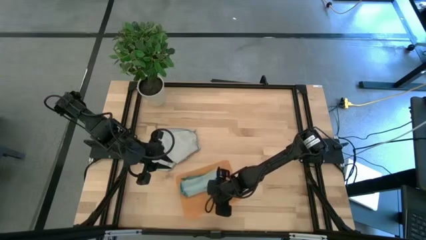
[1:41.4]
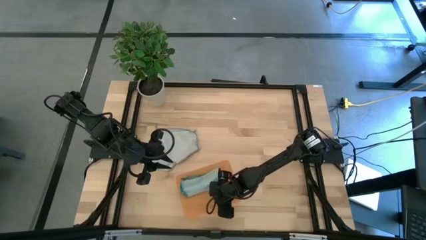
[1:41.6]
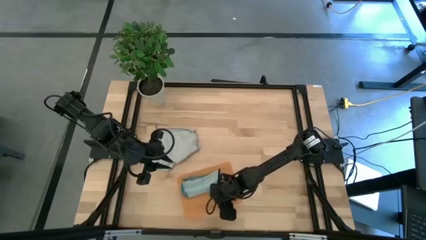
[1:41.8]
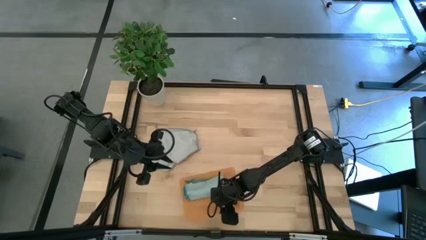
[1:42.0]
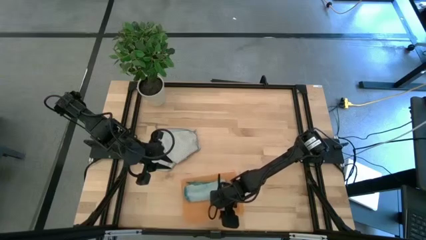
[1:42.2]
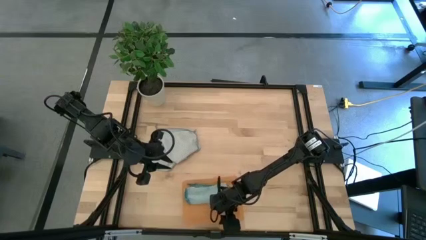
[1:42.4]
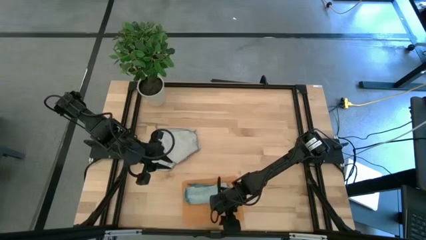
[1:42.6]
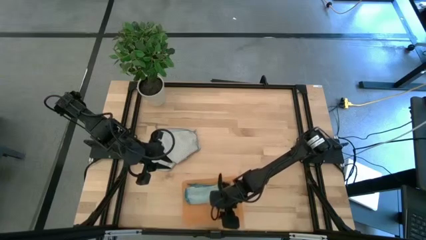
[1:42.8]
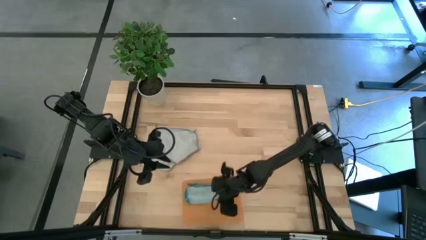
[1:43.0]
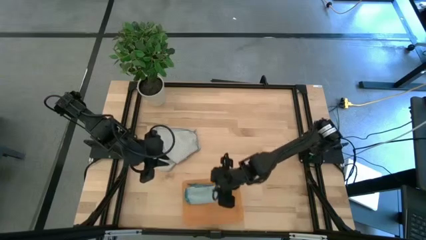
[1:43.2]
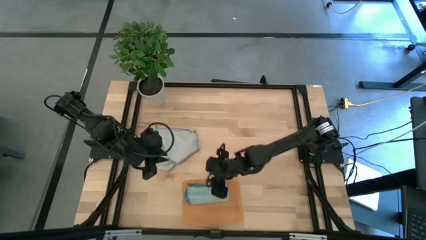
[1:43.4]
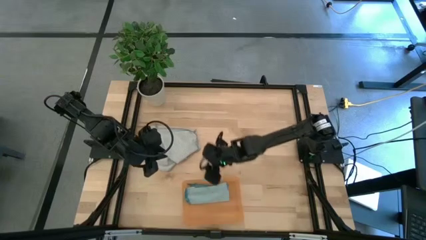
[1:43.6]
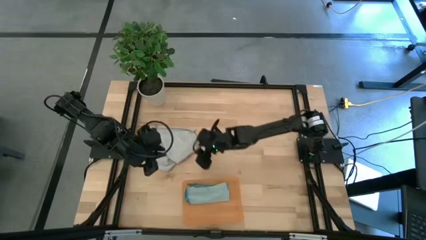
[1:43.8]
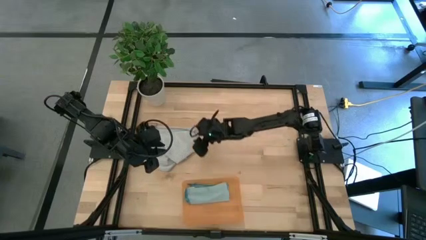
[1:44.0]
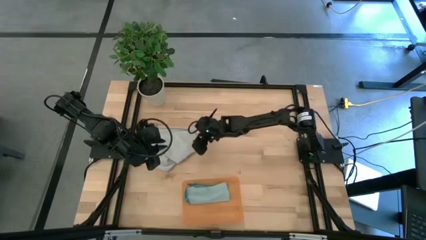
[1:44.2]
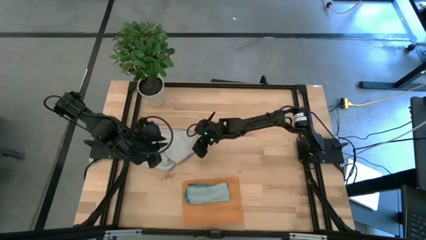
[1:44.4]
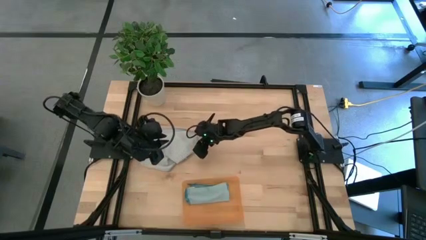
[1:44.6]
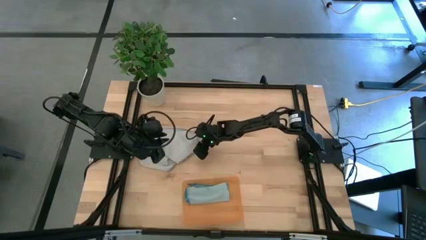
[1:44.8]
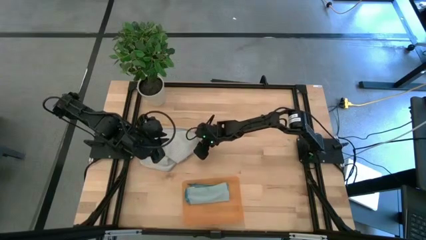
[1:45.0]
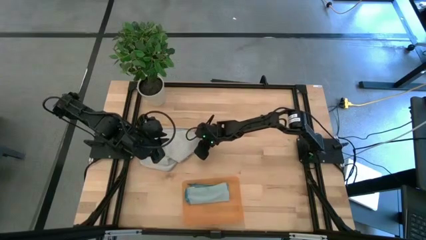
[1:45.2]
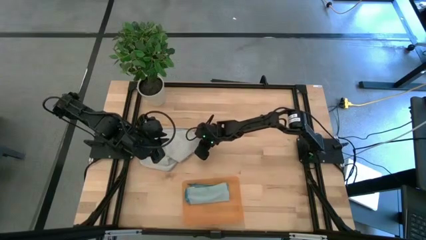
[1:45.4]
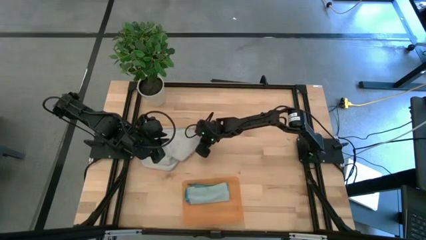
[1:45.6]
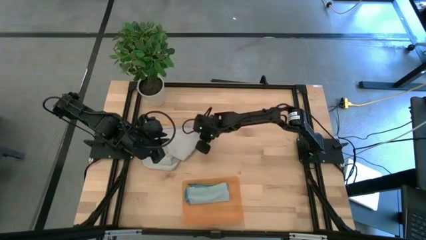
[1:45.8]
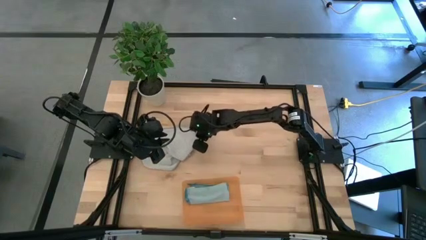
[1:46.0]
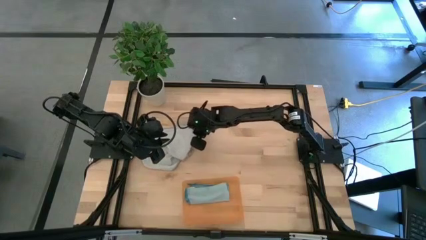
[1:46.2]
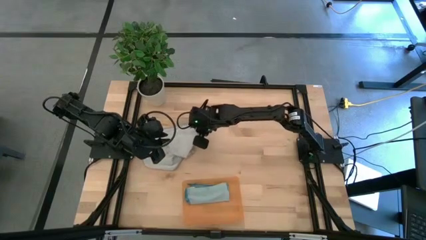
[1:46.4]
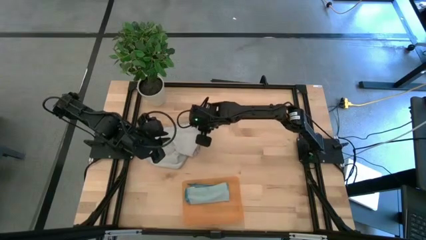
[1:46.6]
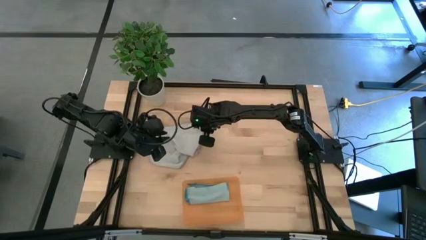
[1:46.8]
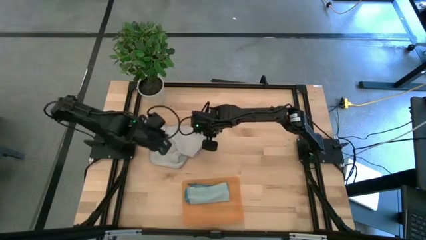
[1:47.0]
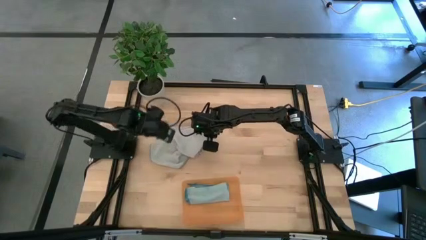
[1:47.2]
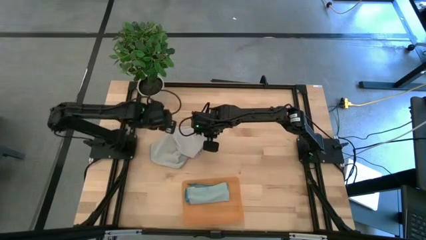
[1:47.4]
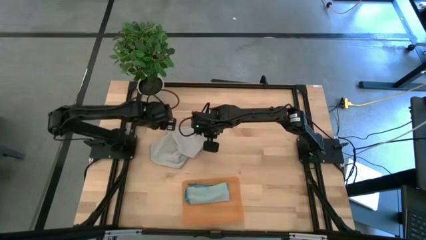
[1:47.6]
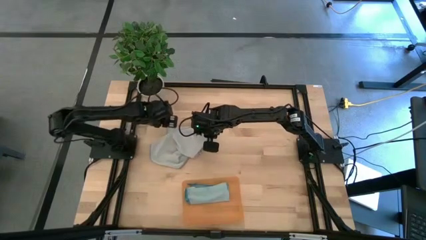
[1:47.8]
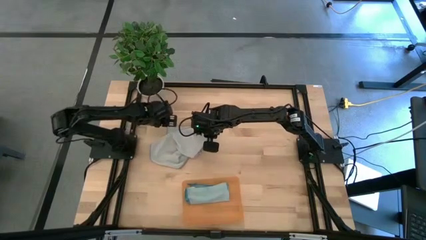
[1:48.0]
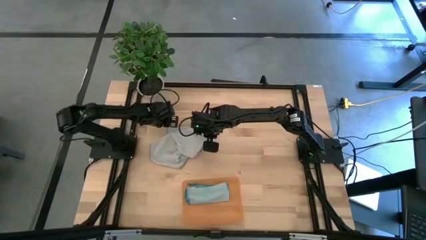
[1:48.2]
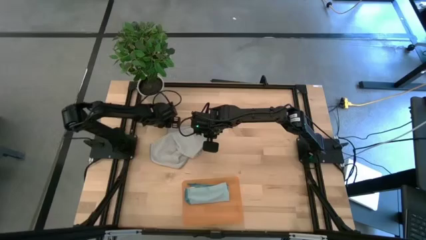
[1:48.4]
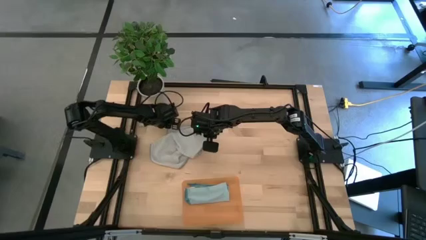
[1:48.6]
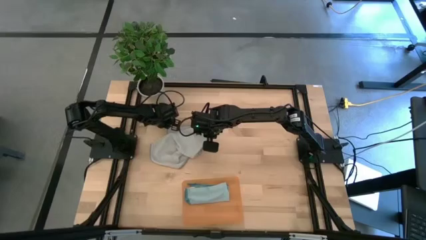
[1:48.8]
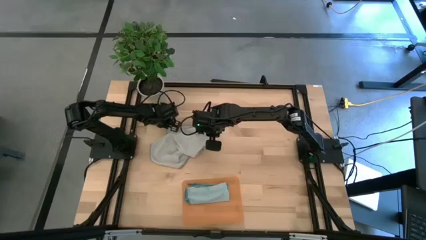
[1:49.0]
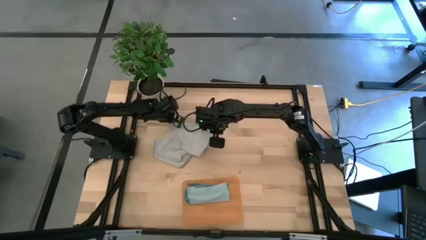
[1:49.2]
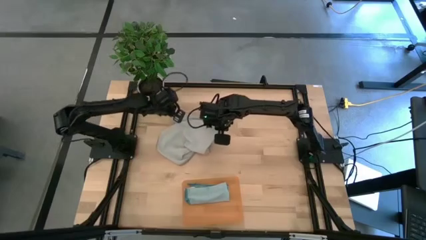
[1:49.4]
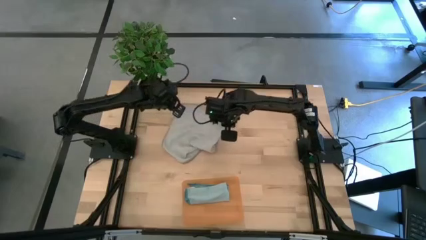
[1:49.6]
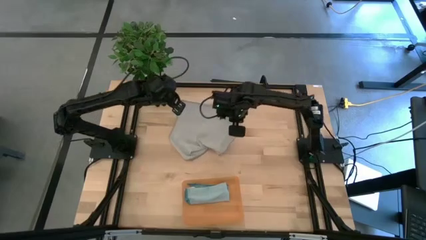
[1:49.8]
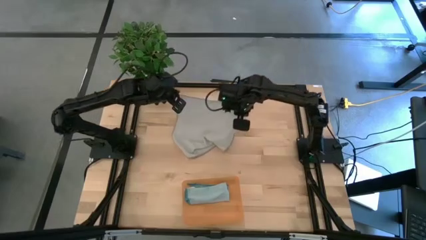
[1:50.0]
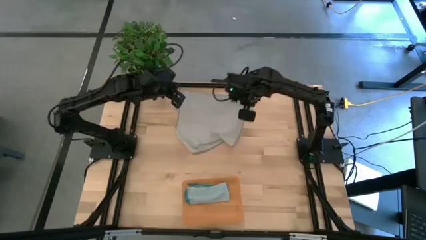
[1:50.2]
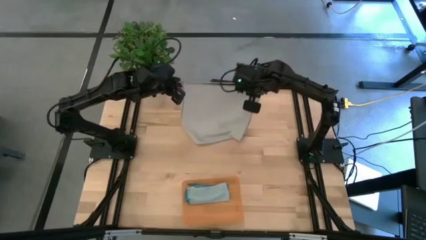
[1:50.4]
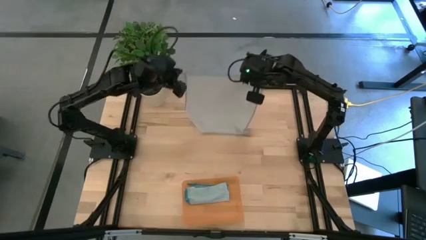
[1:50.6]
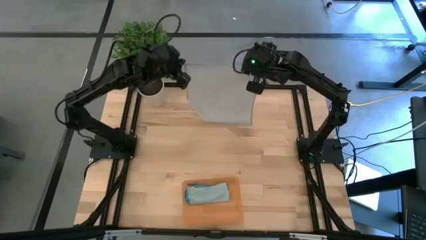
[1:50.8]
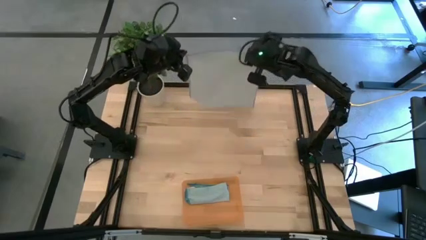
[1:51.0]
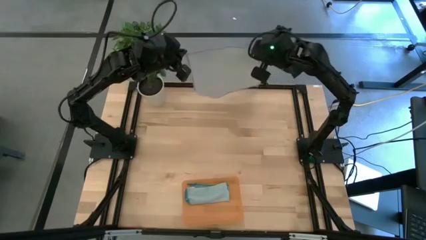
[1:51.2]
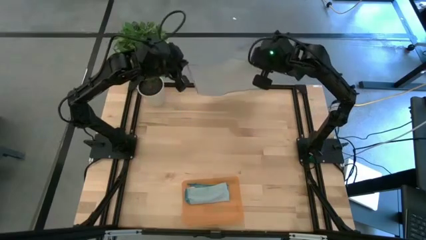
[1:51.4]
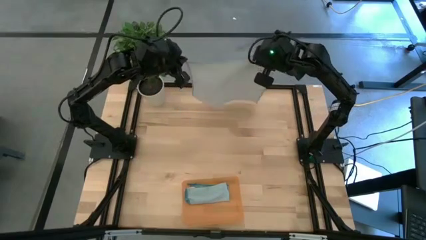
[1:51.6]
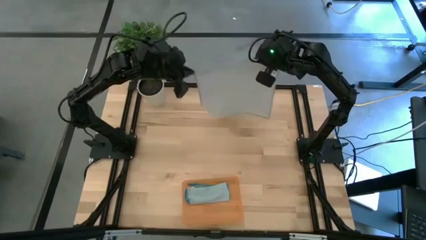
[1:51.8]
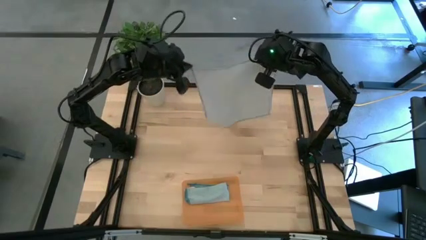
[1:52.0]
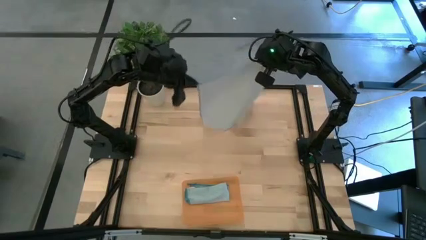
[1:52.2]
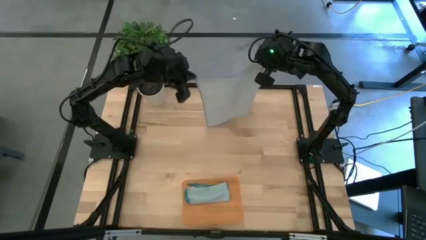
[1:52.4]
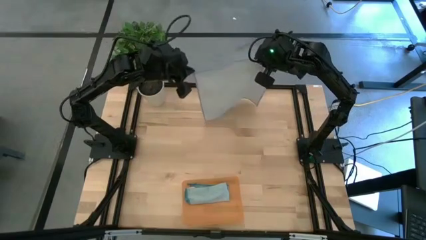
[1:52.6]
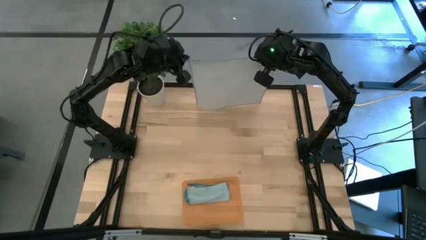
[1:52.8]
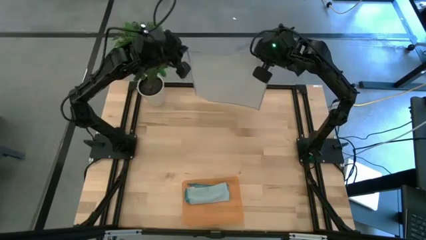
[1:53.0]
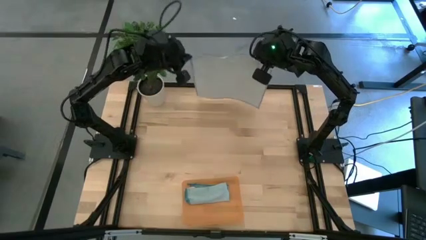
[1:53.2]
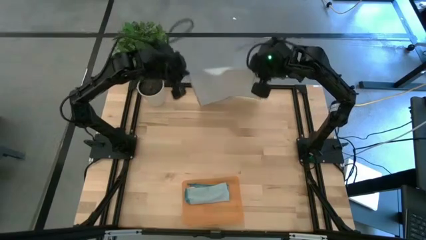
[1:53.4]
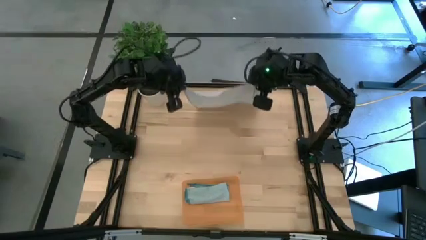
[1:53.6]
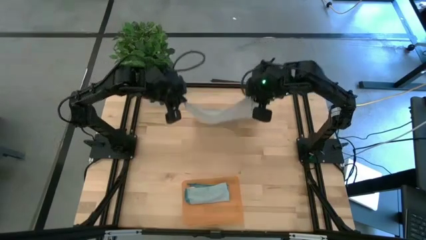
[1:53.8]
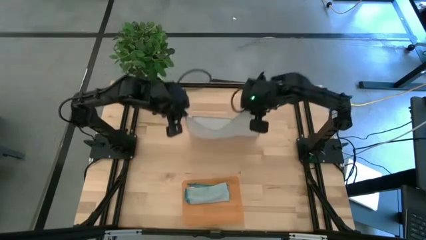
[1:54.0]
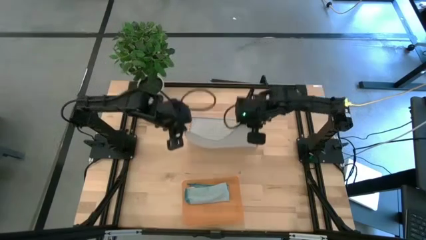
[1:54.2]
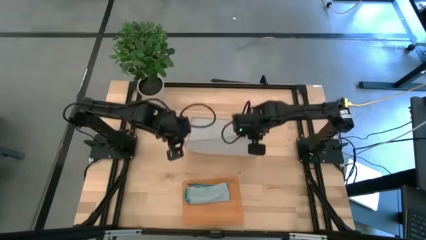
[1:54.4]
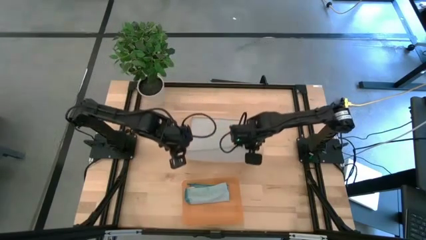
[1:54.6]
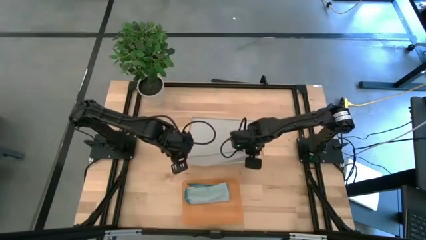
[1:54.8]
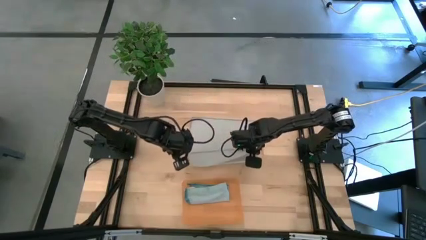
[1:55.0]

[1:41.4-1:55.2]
Task: Roll microfiber towels into tight, uniform cylinder then place into a basket
Fold the gray towel

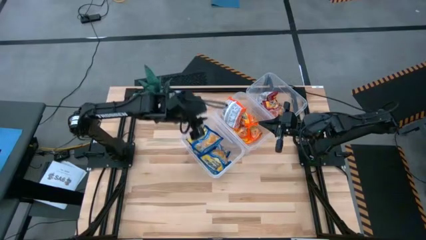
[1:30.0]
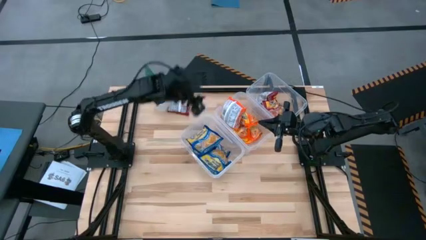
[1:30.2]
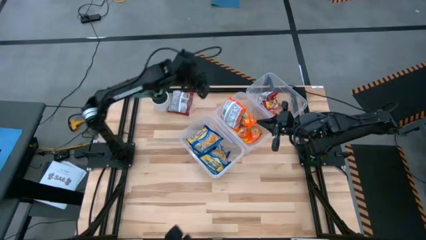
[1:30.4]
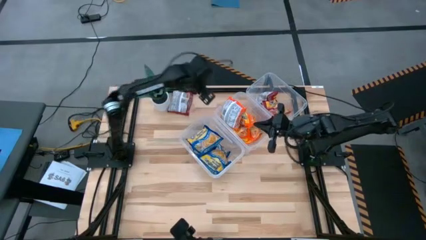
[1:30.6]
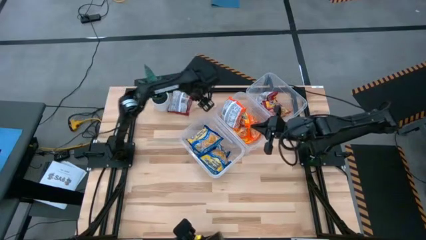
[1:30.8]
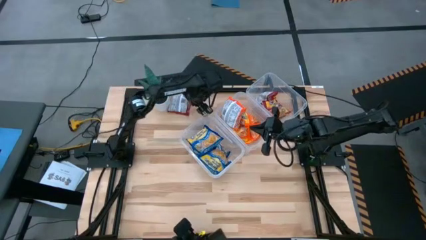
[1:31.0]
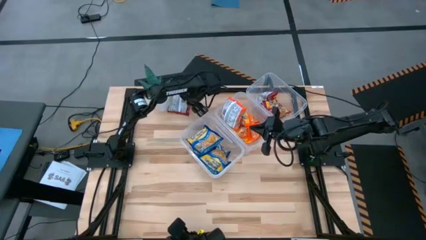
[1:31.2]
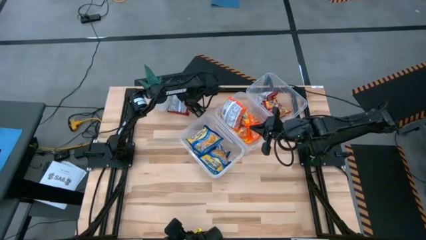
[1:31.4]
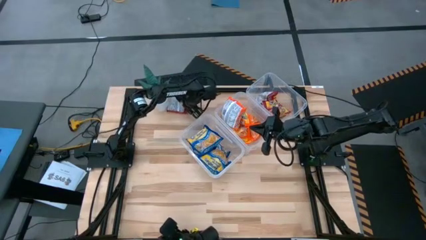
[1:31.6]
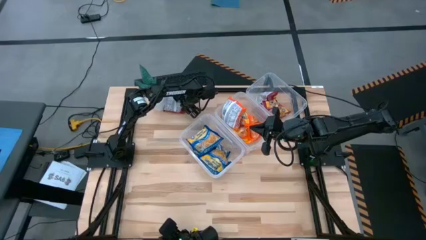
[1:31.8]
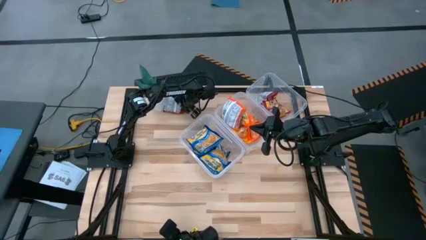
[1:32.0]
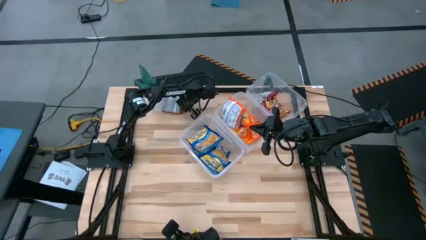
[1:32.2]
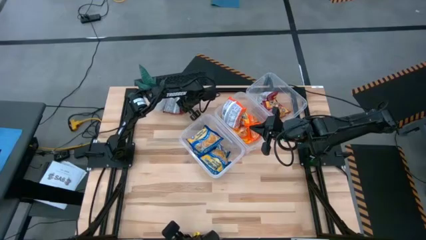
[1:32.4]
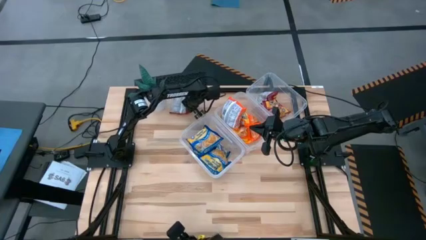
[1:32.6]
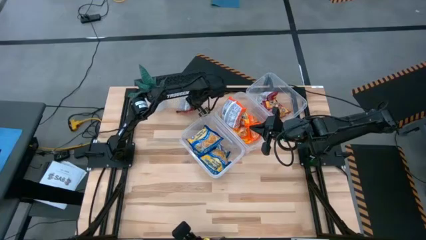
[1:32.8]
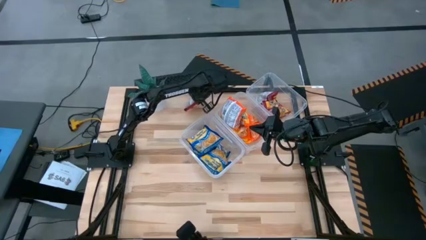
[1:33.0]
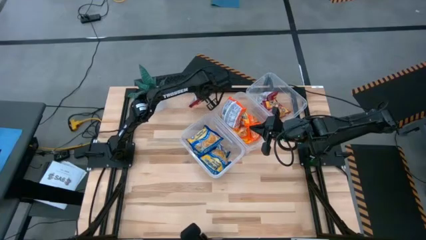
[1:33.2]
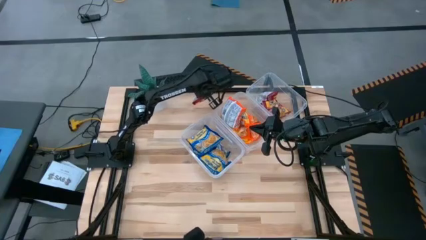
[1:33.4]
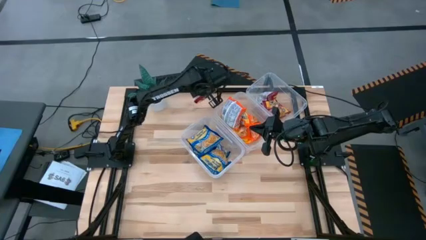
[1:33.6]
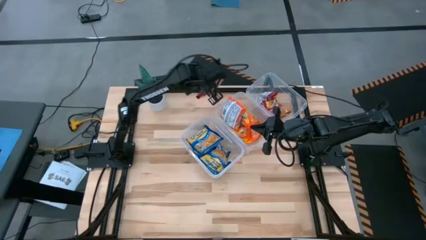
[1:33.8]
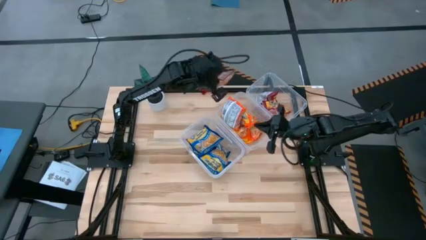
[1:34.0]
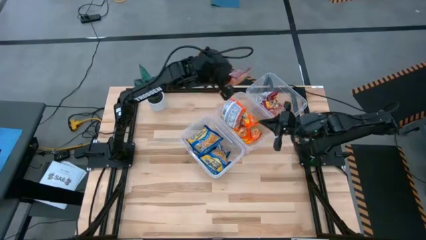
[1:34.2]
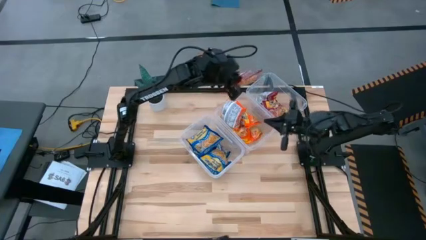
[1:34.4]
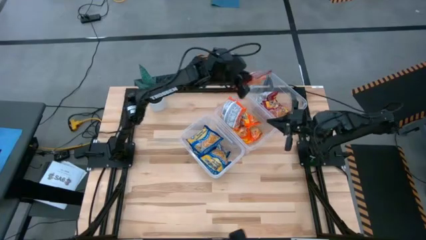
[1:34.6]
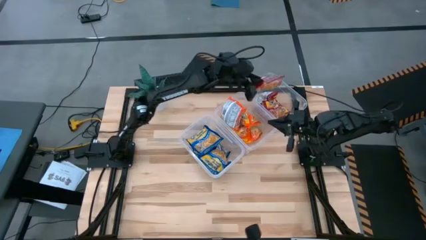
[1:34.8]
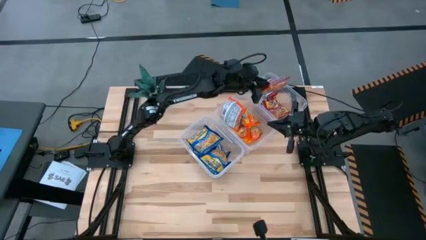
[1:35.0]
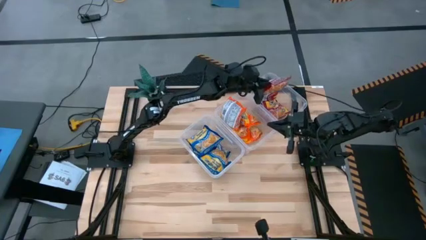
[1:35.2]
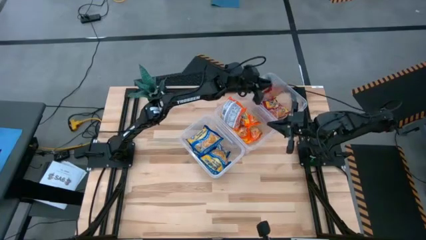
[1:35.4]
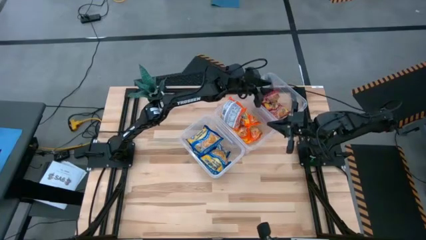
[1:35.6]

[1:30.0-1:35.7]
Task: Sort Maruchan noodles
Put the red noodle pack into the top left transparent bin
